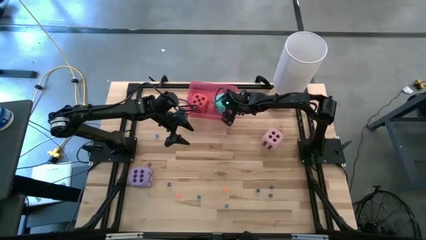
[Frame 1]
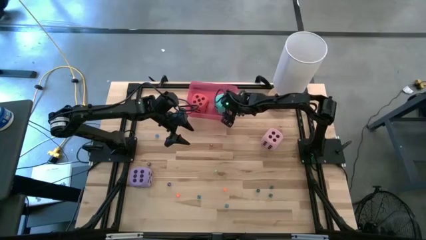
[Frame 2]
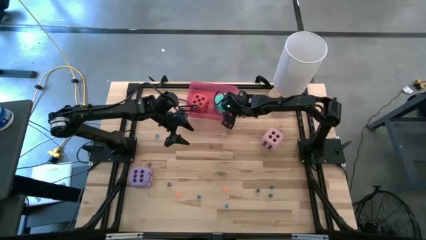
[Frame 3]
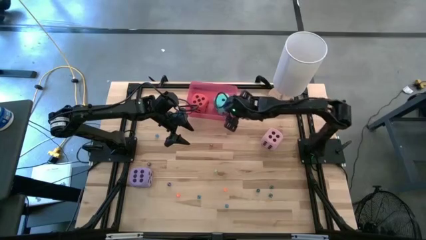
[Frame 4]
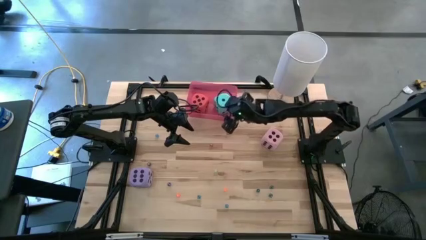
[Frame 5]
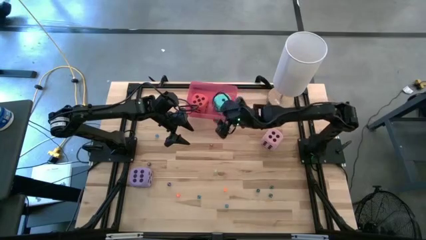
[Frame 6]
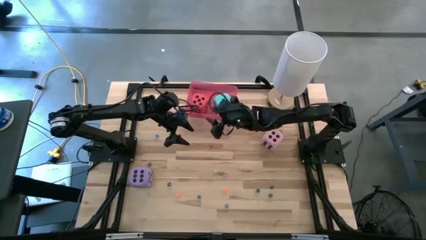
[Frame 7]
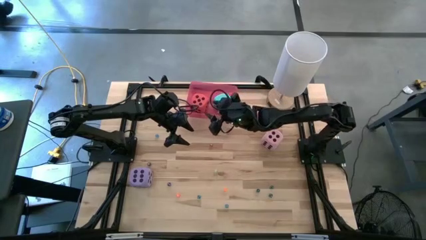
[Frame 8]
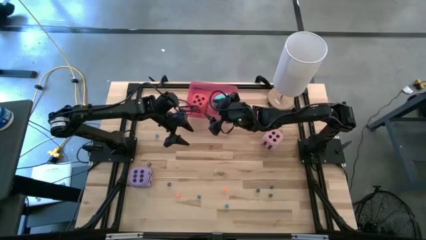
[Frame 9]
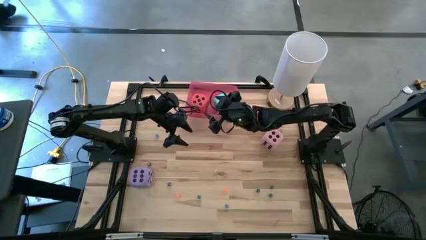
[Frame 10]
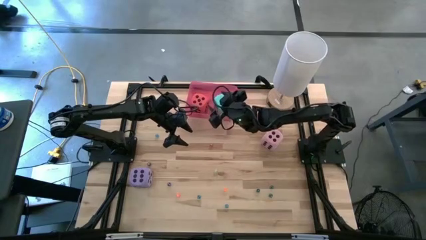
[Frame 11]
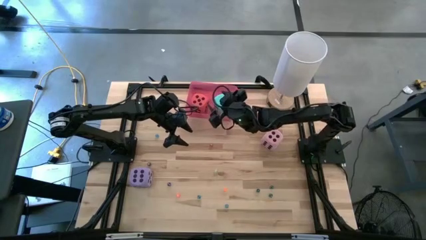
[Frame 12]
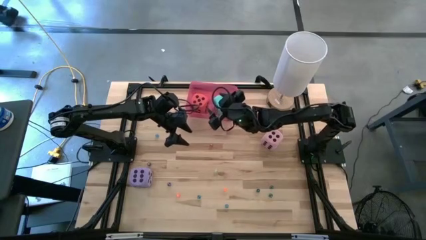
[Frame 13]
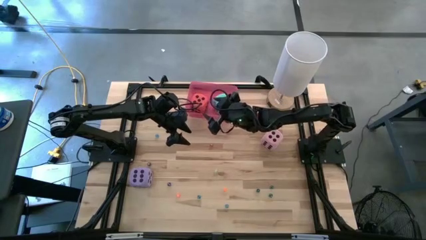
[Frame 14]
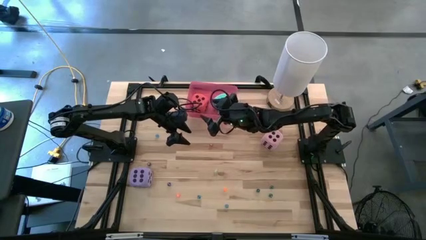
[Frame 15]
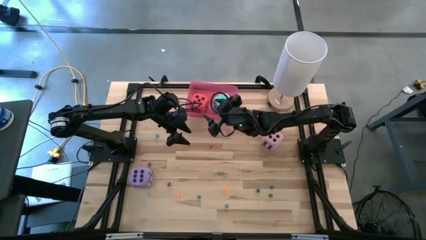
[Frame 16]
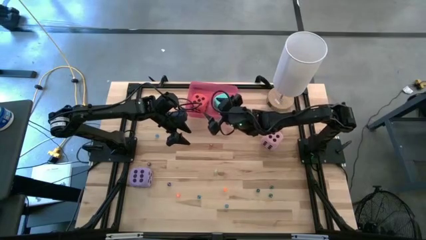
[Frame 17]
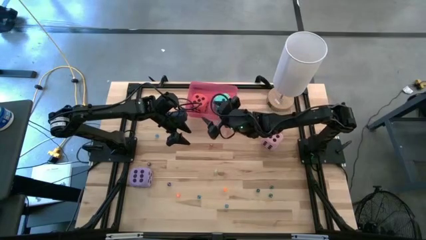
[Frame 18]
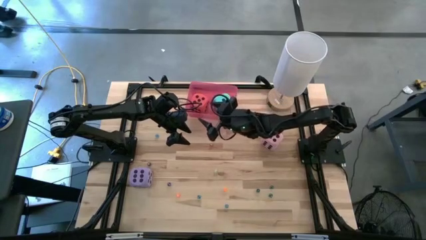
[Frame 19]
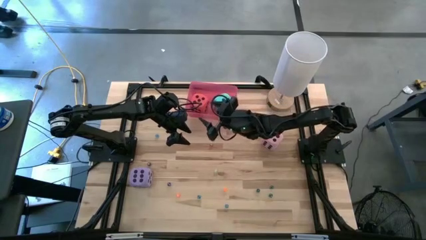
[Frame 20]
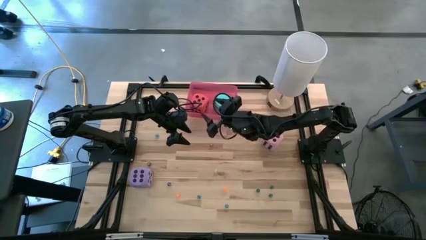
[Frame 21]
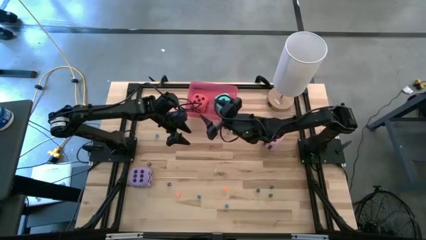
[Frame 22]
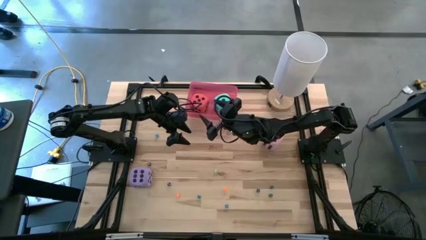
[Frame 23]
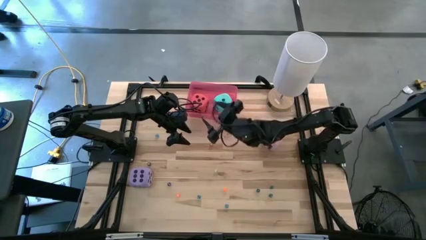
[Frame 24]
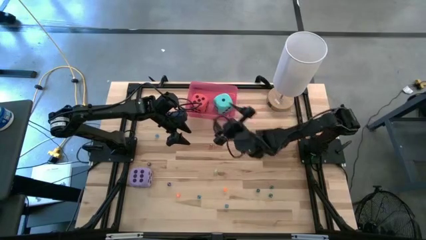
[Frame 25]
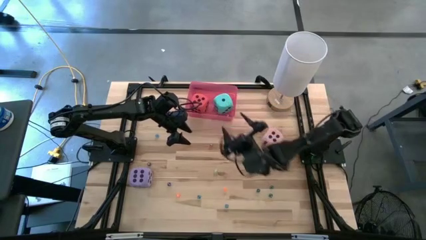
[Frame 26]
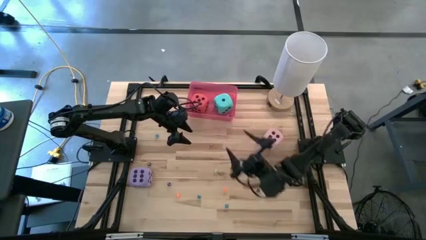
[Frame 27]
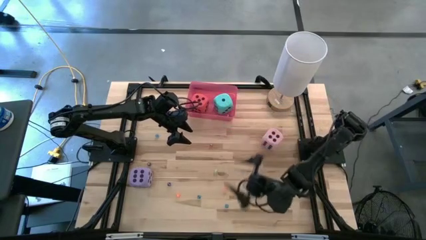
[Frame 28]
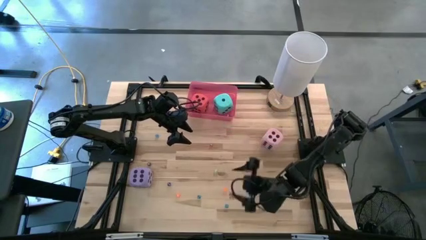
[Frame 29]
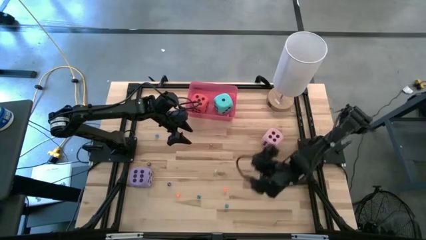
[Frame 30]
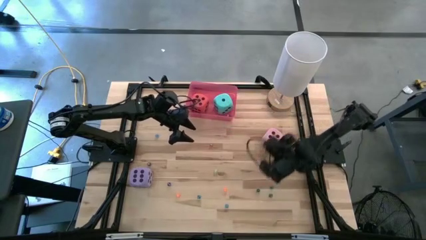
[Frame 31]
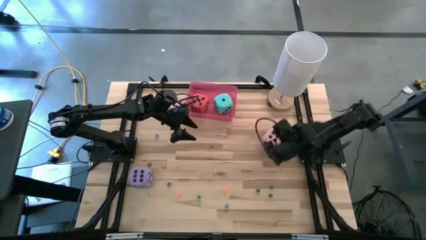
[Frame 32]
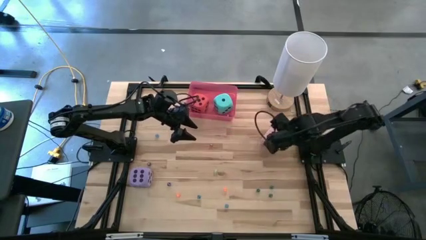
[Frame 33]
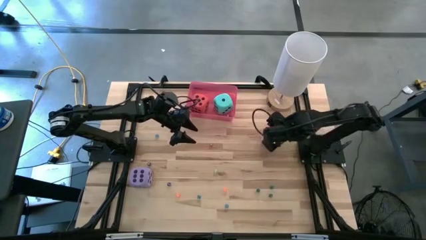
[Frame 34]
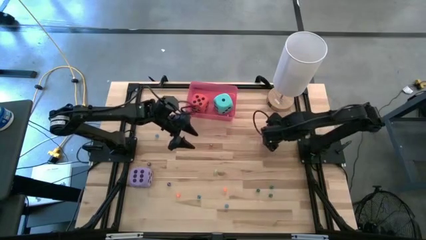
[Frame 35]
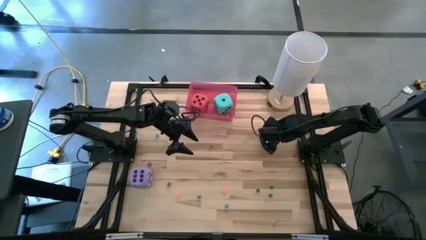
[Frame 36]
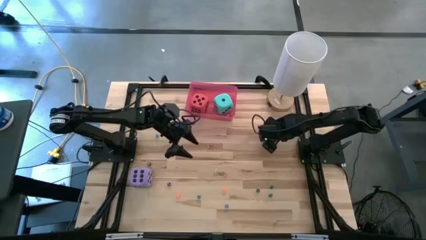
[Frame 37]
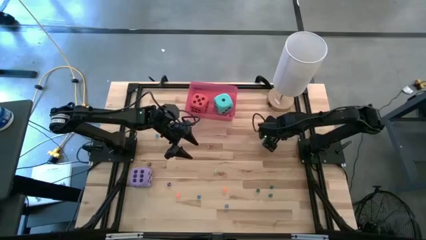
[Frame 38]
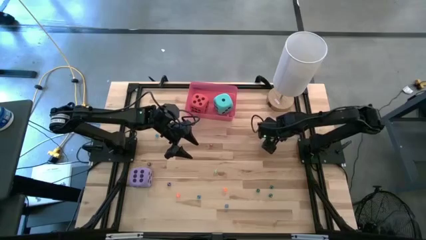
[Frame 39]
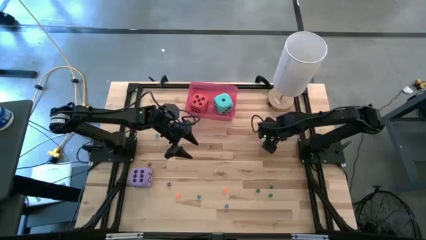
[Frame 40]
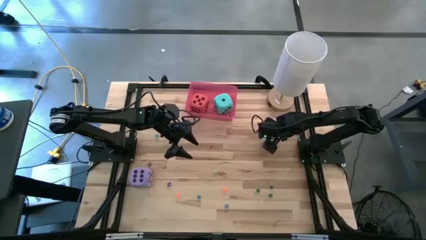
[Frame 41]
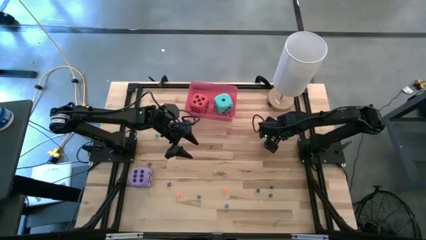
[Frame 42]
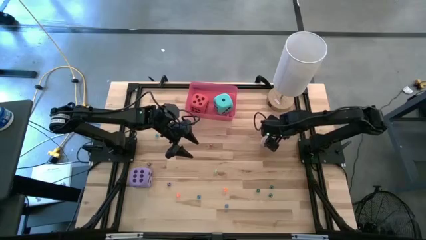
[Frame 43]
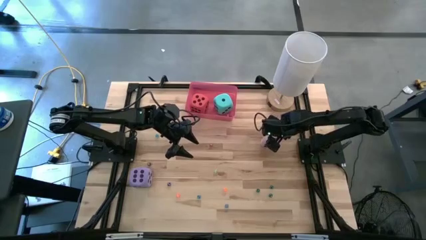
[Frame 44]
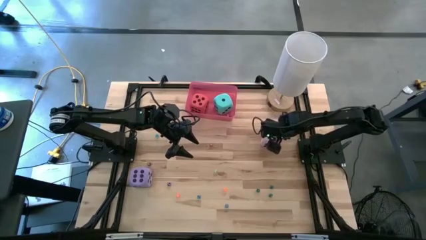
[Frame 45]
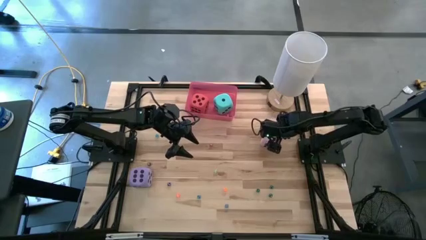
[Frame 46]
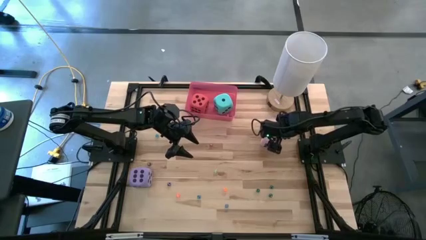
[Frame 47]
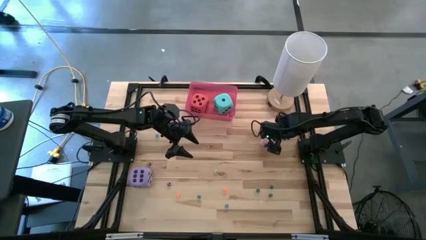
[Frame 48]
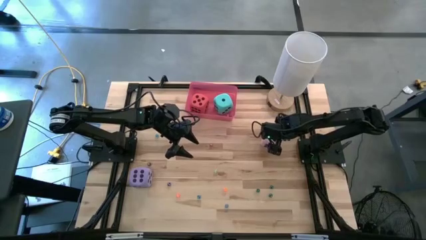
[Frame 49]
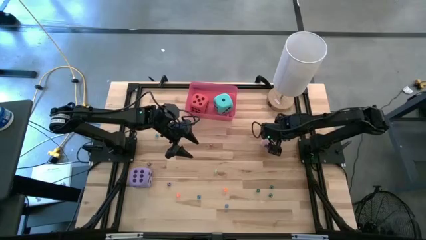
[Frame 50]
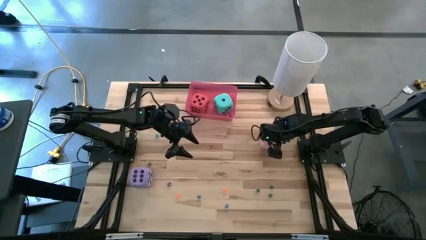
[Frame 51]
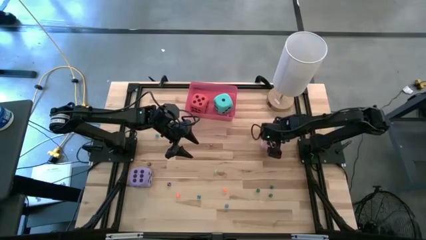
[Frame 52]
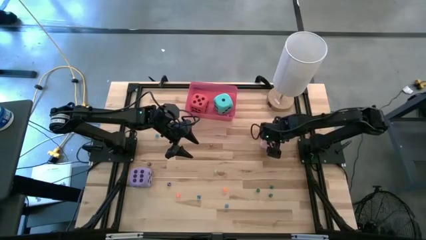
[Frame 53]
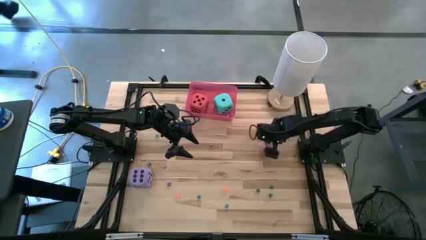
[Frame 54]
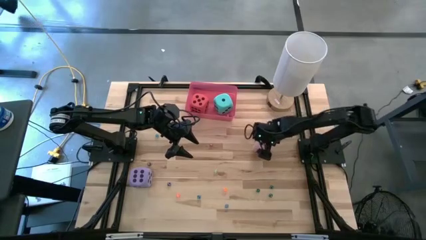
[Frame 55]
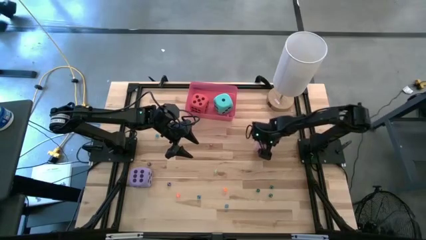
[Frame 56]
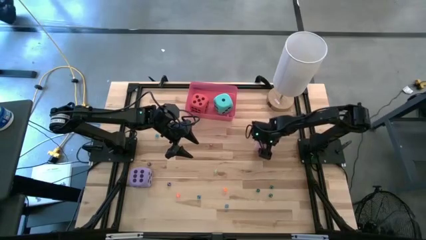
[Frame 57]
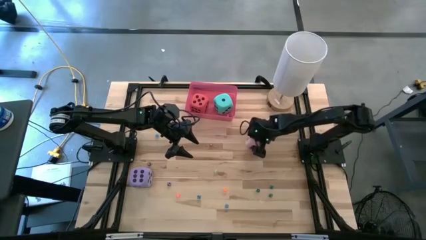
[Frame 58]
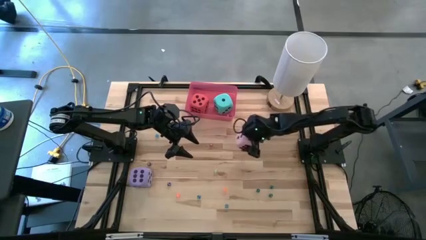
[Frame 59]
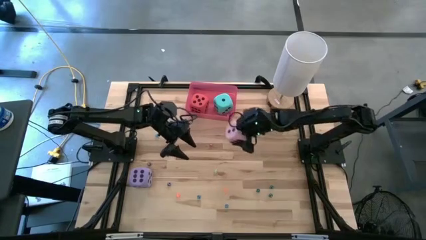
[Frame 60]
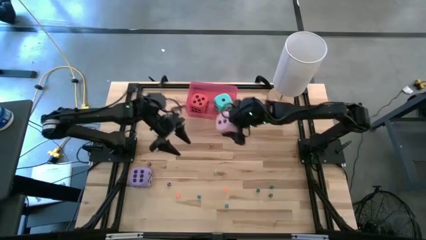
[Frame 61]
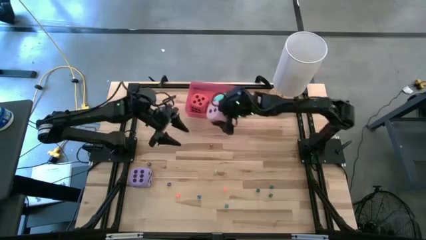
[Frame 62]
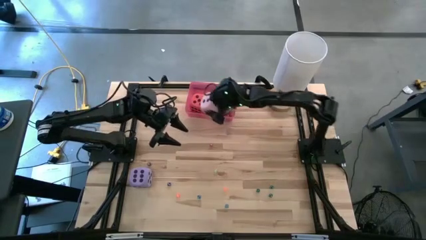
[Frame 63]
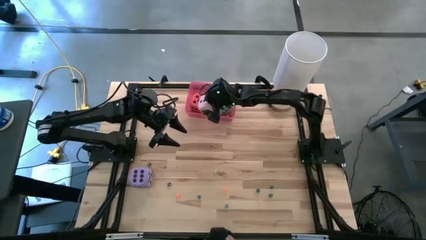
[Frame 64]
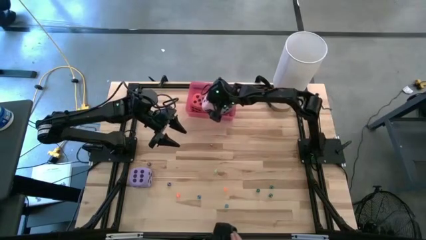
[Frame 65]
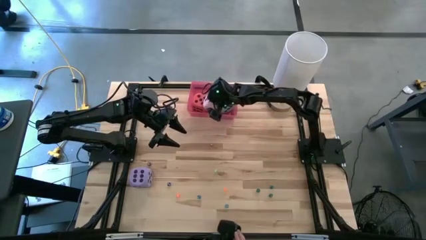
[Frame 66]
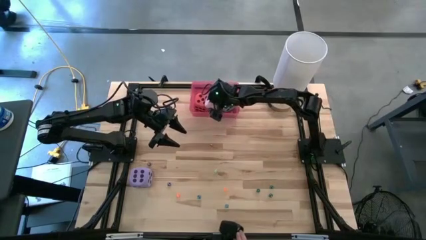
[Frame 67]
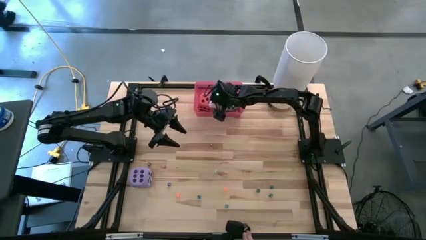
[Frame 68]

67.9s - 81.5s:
Task: Pick & Place Dice
Put the large pink dice into the pink bin
